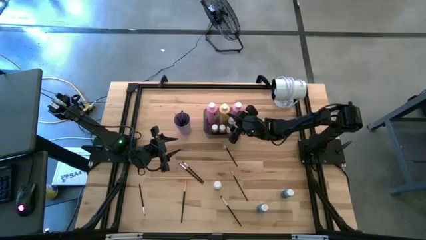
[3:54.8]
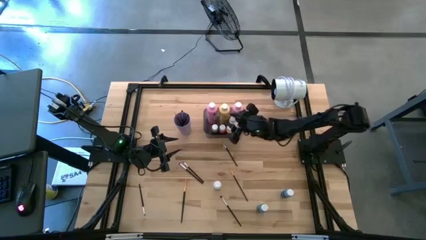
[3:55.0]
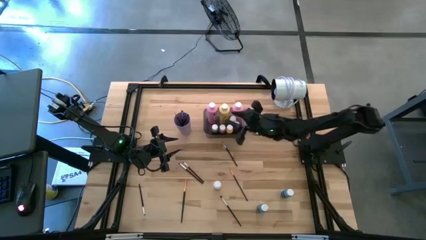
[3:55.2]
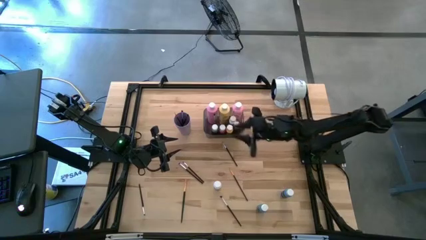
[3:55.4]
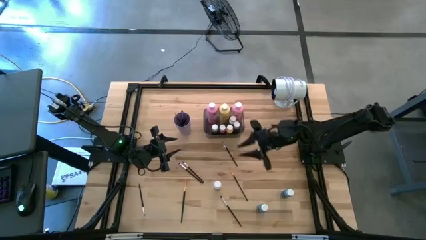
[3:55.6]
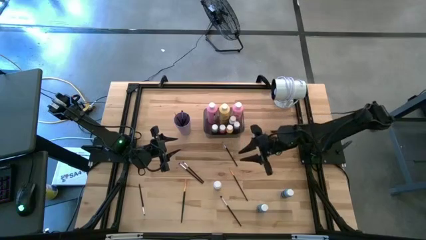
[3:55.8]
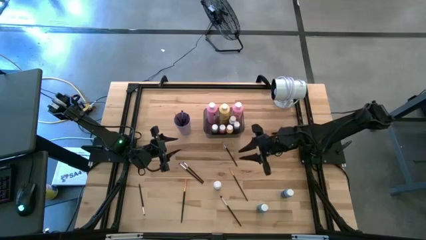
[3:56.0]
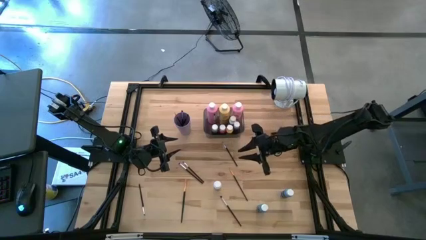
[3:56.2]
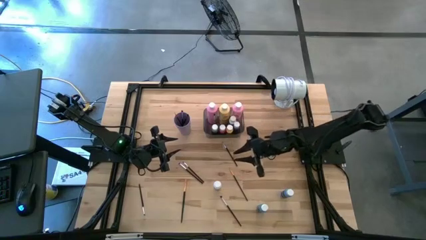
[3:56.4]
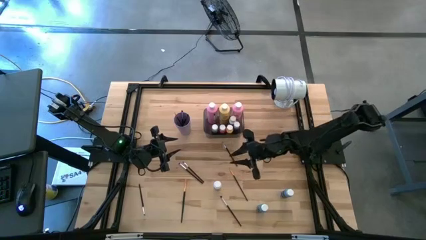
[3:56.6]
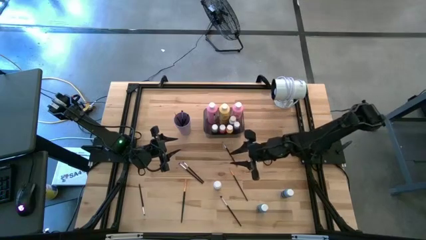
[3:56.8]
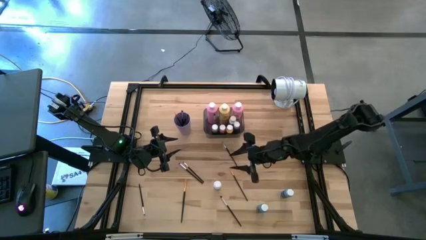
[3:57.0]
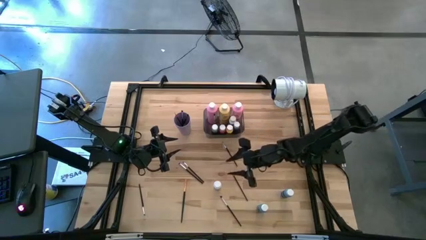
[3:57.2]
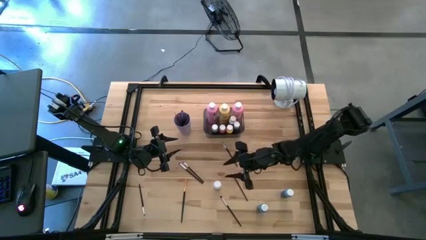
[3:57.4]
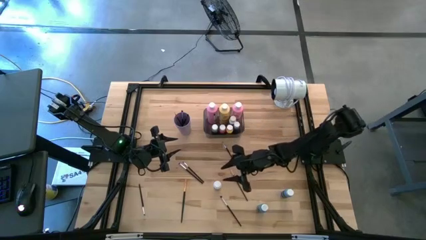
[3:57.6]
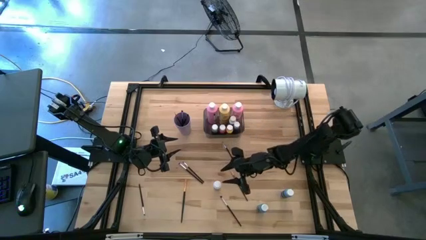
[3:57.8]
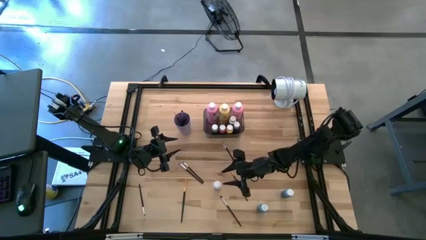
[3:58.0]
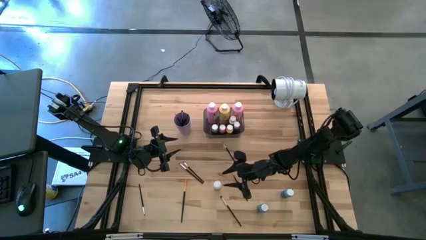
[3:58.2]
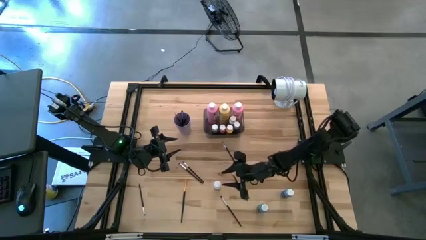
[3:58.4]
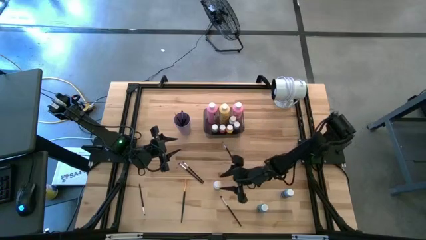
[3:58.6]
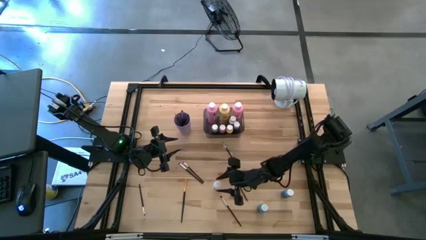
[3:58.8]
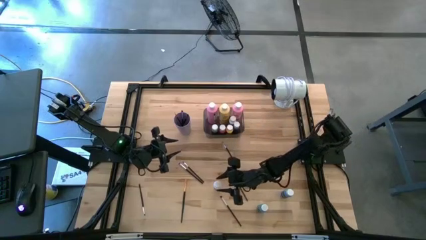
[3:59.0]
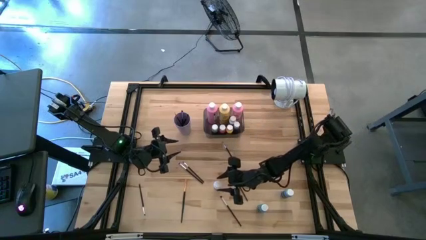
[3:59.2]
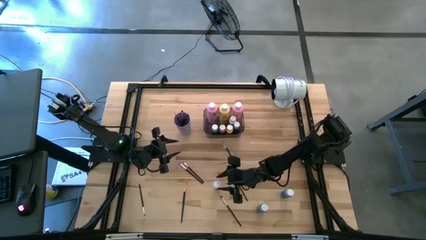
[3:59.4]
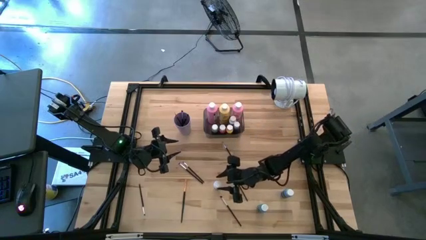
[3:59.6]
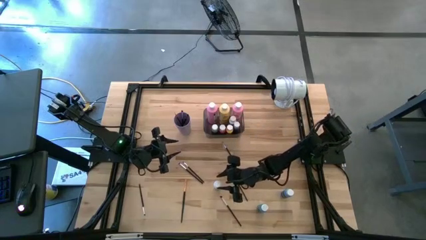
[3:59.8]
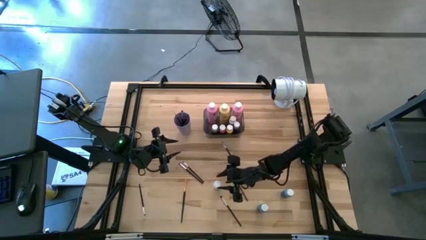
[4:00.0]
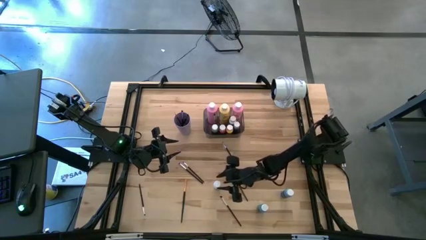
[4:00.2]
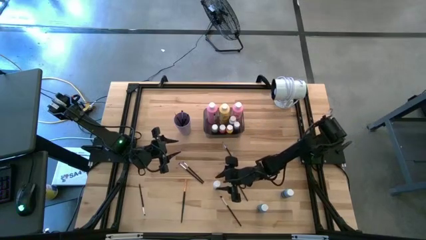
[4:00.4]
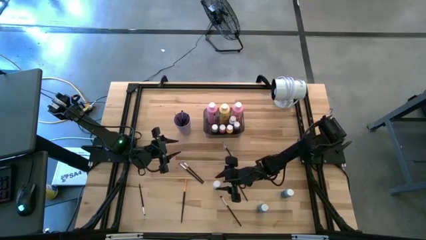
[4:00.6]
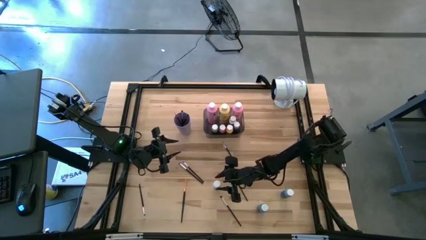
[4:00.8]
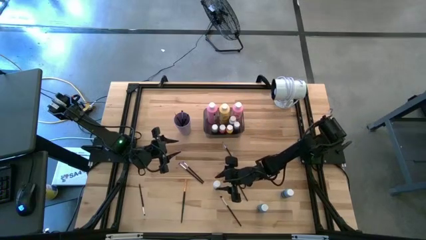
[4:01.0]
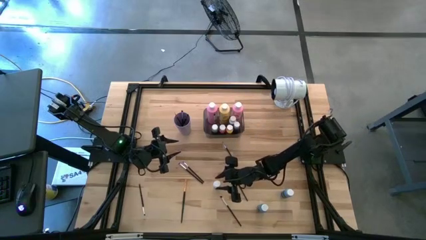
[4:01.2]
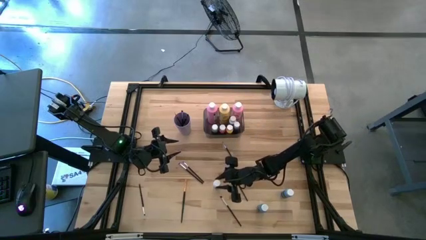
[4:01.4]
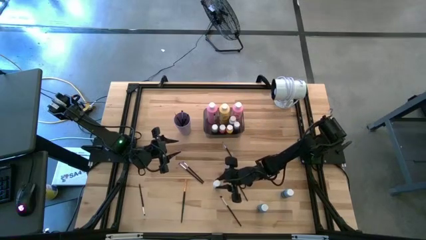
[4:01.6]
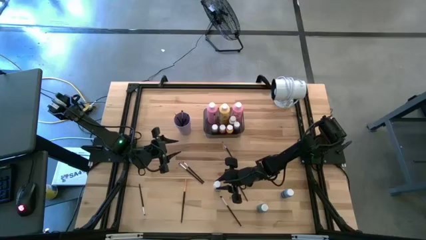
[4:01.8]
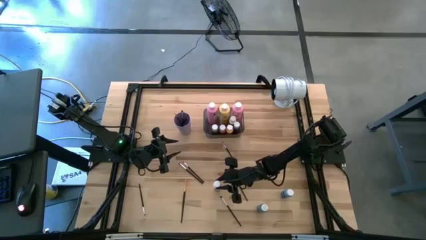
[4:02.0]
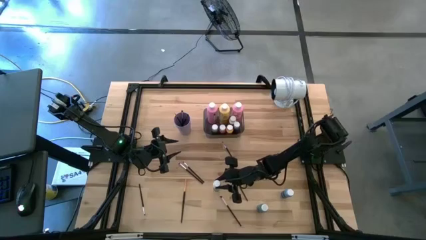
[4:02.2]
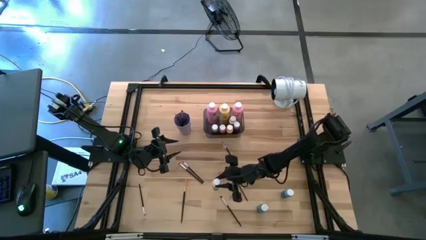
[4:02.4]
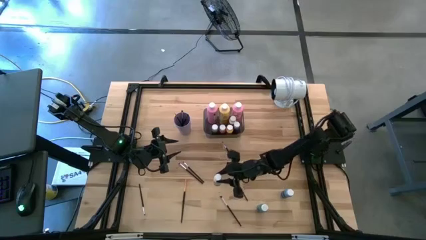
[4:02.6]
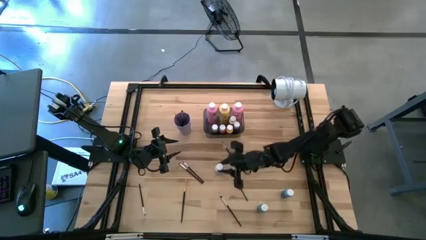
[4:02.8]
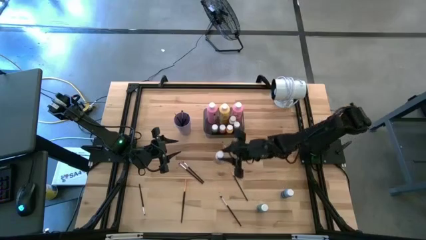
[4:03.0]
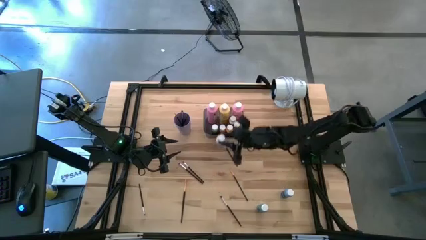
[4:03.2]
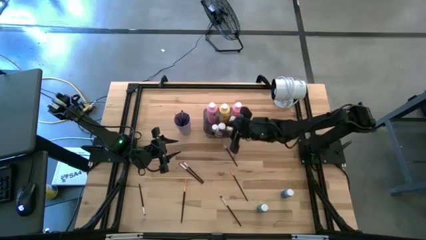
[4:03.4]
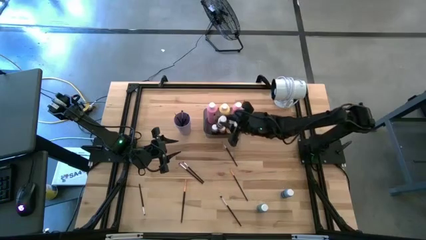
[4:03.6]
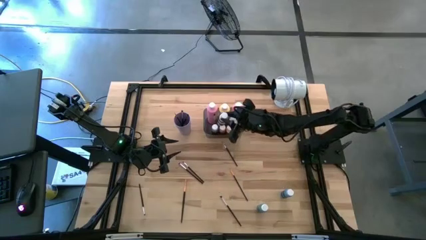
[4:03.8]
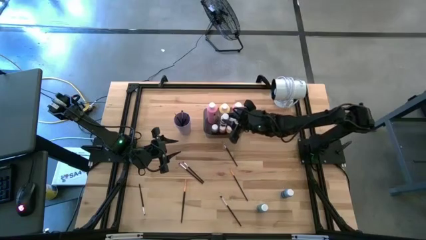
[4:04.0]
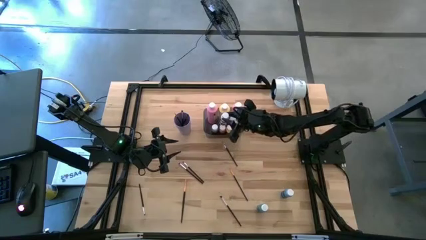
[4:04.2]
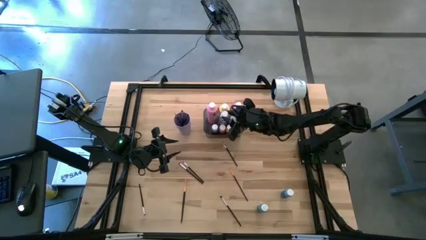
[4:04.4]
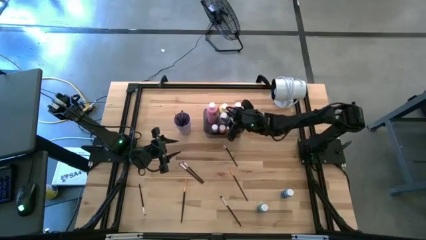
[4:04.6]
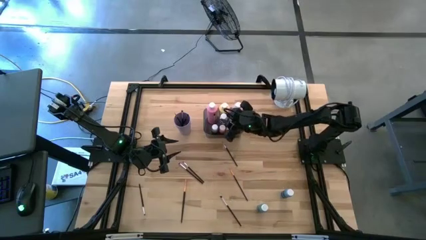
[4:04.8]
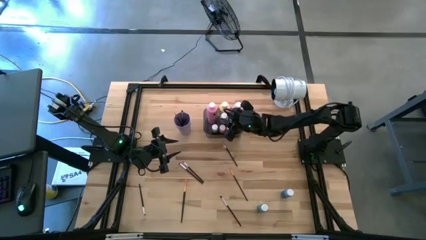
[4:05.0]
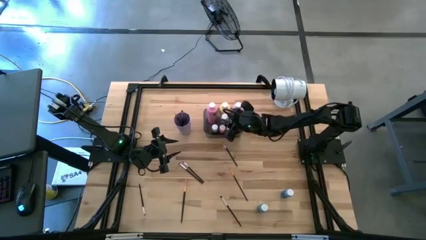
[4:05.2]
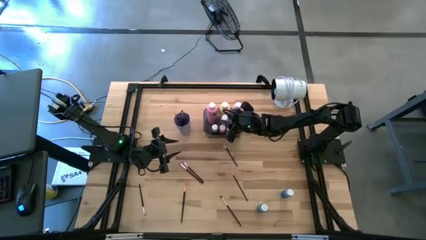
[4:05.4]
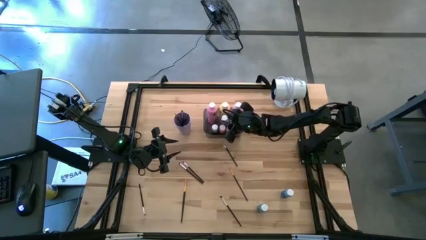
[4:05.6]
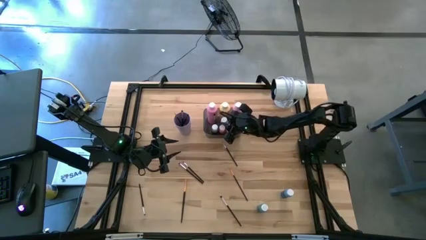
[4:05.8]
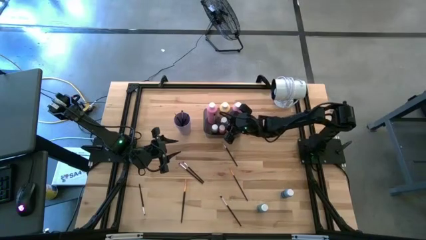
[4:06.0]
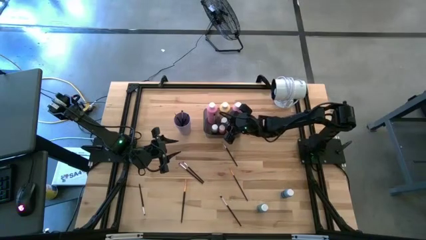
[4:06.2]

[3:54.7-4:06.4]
Task: Pick & Place Paint Supplies
Put the small white paint bottle into the gray bin

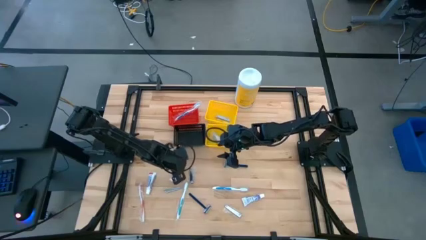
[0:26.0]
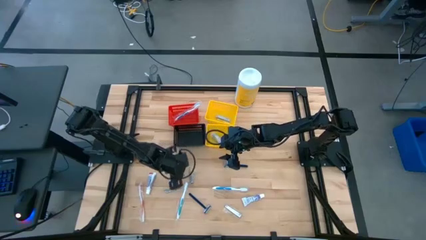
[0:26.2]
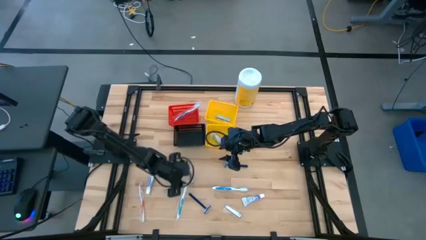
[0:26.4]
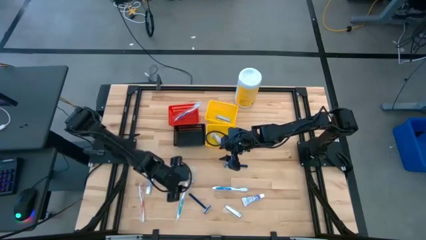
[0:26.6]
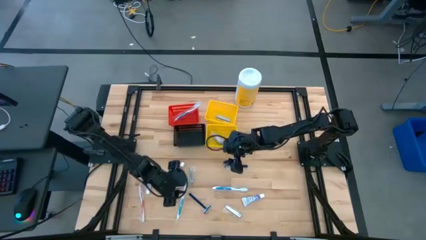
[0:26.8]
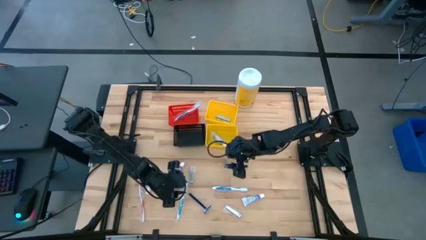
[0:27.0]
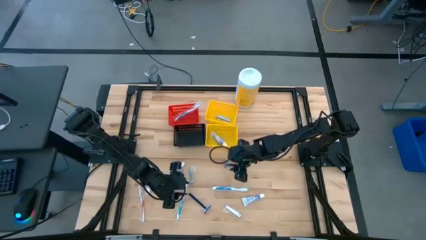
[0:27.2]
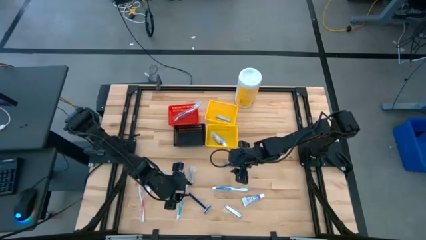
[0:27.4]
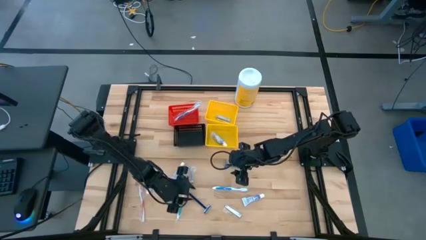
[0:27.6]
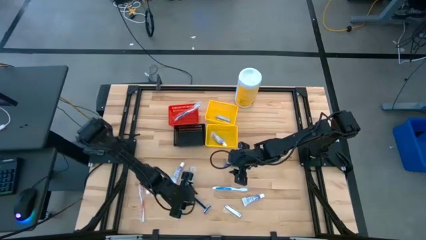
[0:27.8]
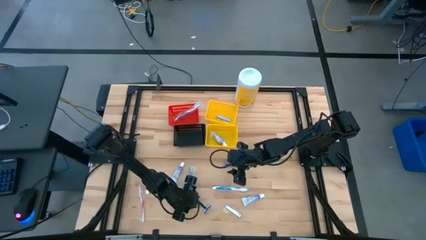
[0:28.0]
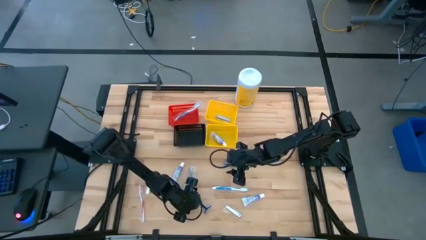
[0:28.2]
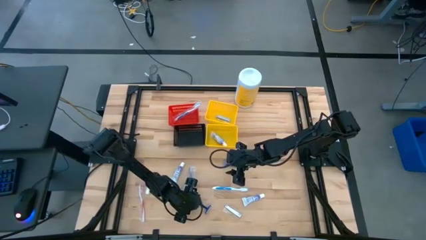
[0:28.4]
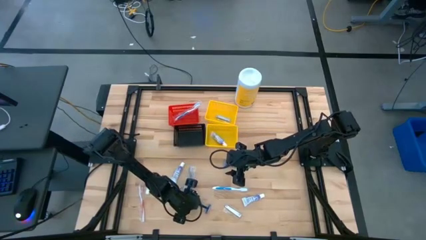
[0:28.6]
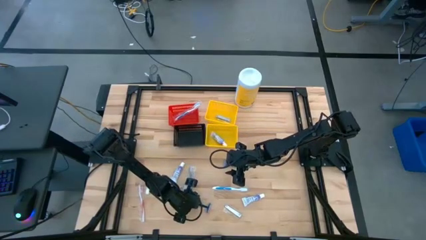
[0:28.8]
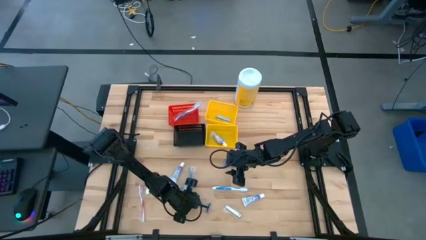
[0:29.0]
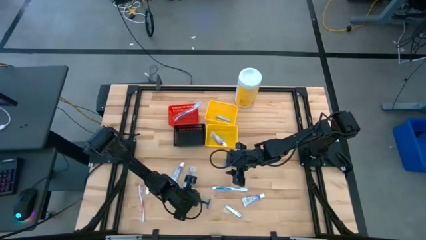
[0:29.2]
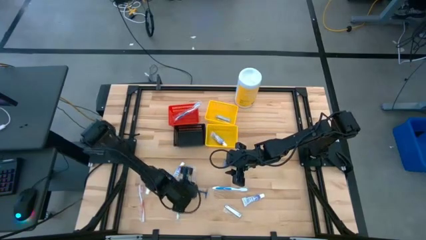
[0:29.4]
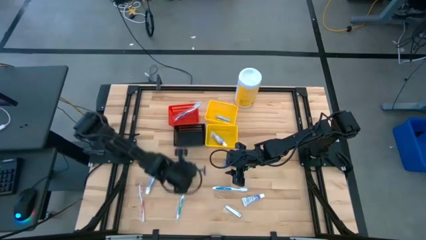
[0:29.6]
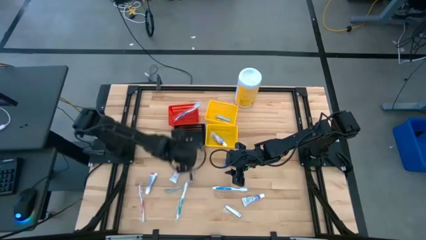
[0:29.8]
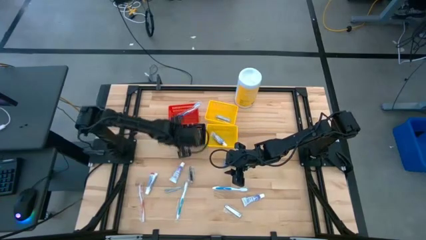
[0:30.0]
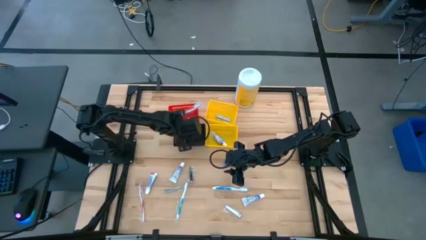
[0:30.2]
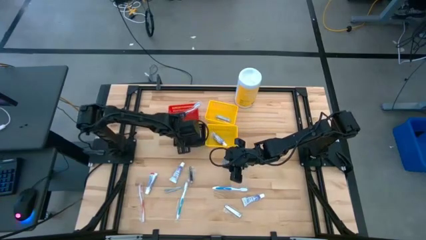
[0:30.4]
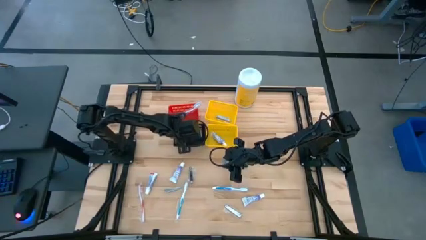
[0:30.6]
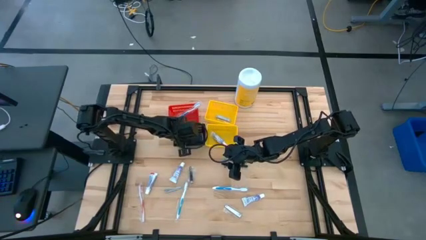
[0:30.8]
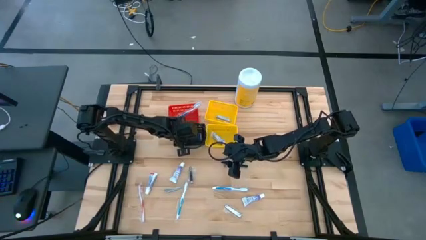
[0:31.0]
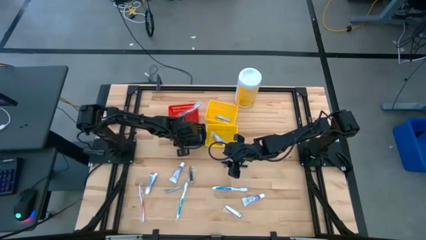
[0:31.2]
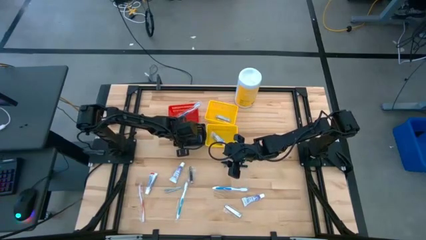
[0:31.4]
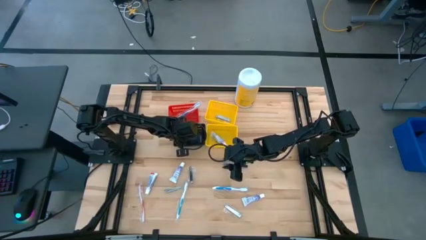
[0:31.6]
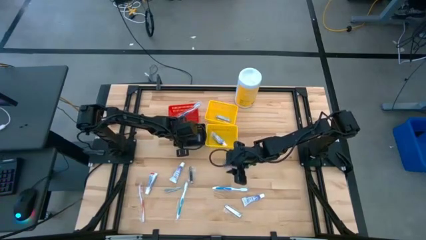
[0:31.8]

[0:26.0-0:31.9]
Task: Pick & Place Travel size toiletries
Put the blue razor into the black bin
